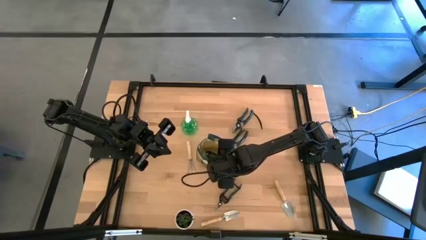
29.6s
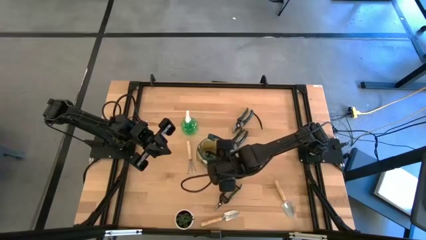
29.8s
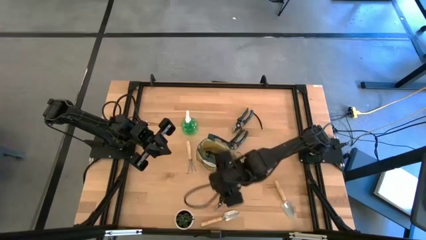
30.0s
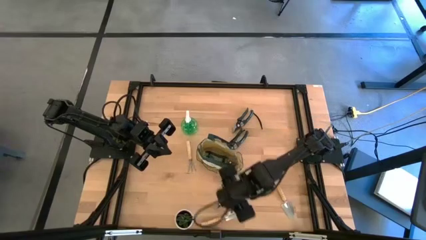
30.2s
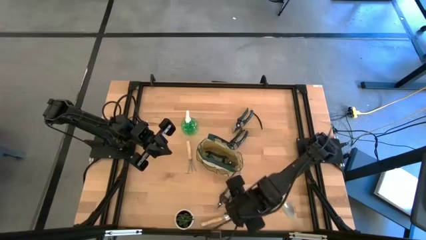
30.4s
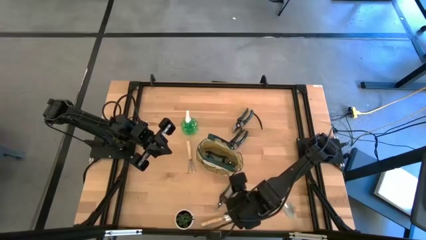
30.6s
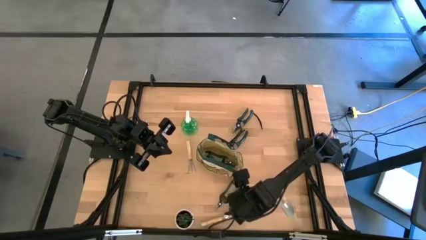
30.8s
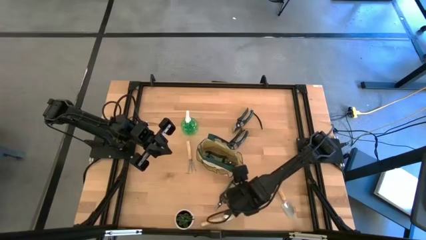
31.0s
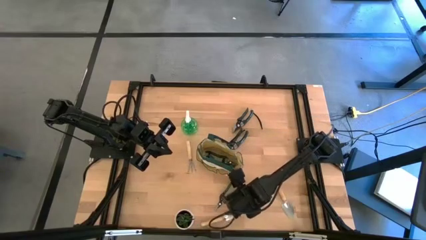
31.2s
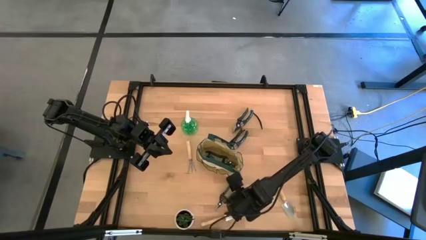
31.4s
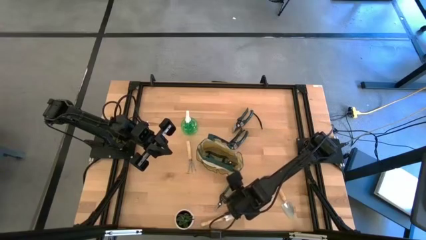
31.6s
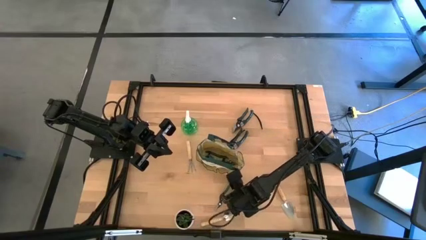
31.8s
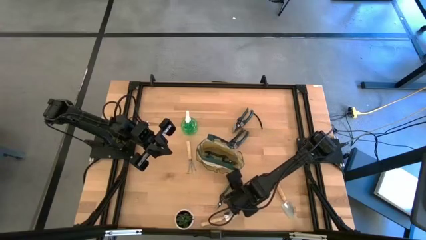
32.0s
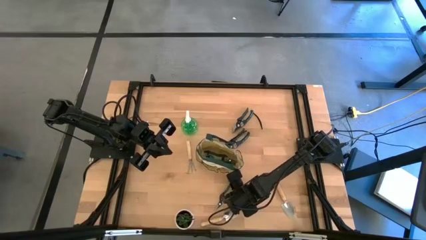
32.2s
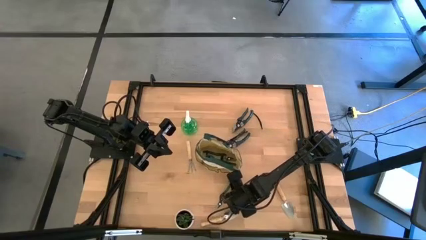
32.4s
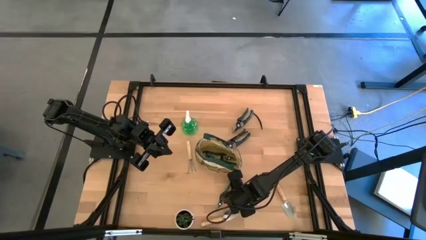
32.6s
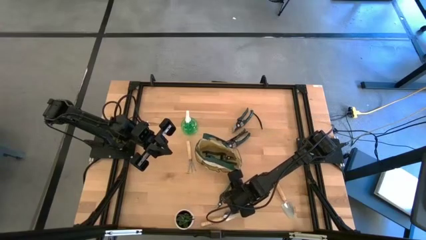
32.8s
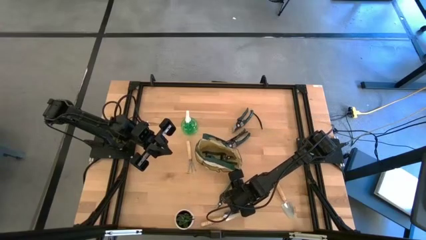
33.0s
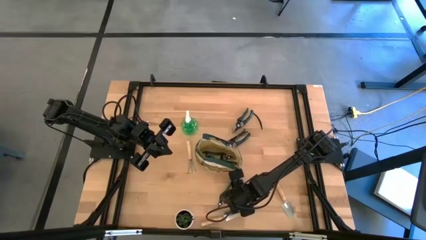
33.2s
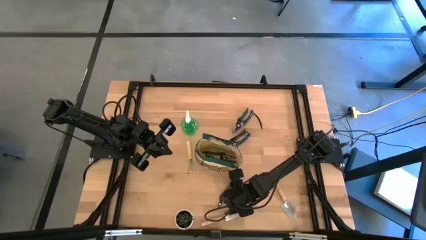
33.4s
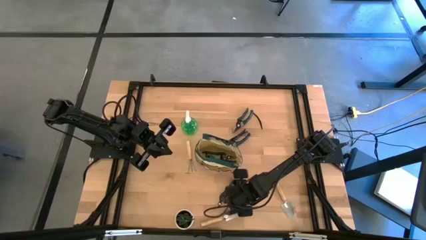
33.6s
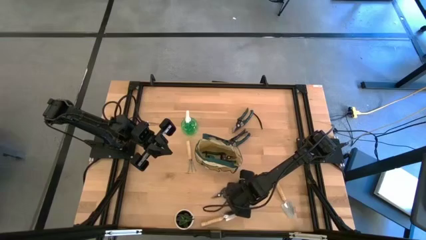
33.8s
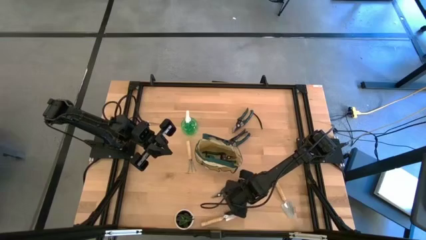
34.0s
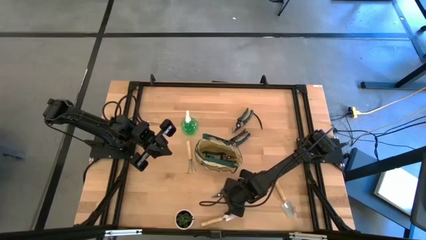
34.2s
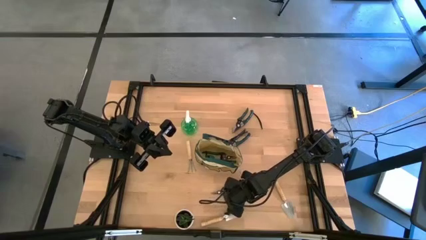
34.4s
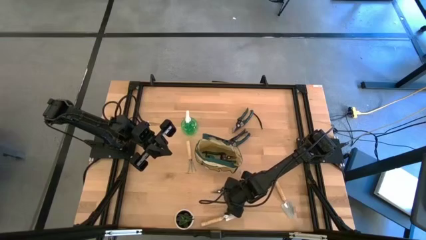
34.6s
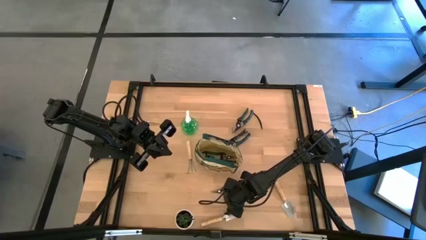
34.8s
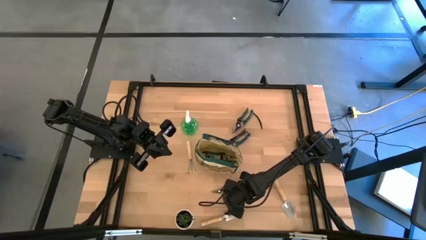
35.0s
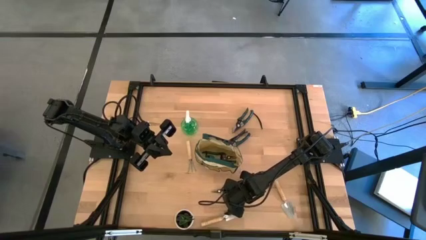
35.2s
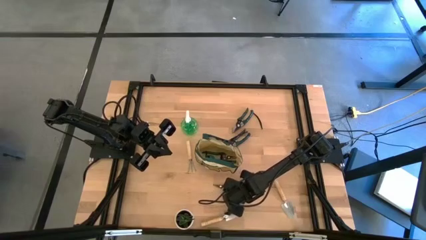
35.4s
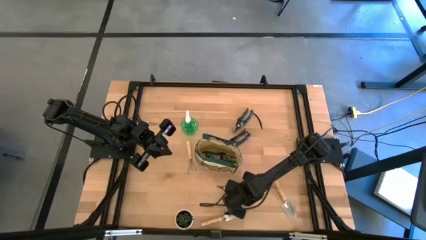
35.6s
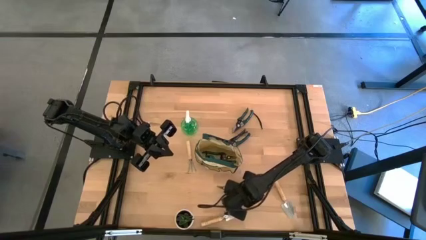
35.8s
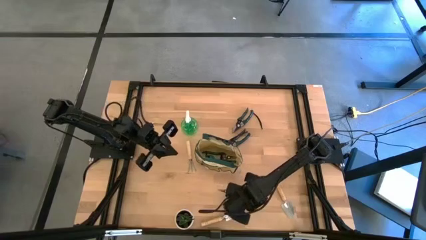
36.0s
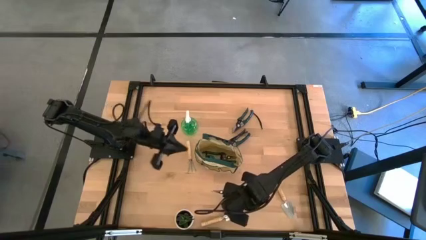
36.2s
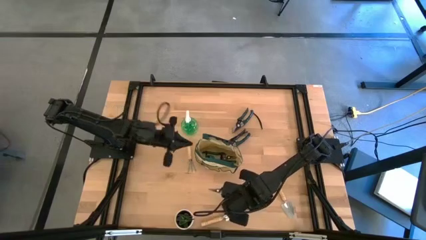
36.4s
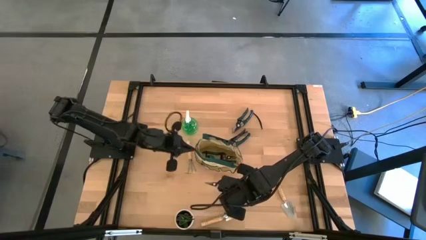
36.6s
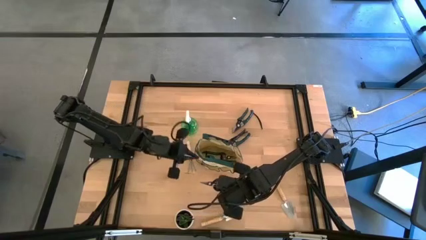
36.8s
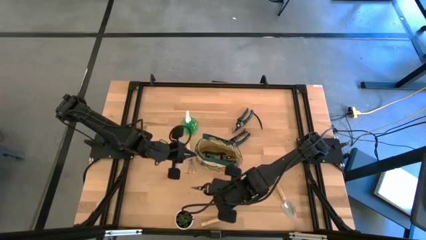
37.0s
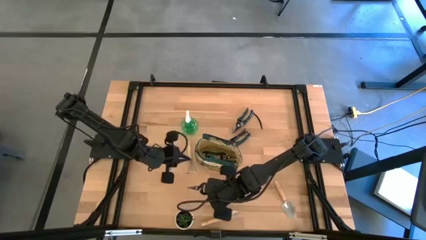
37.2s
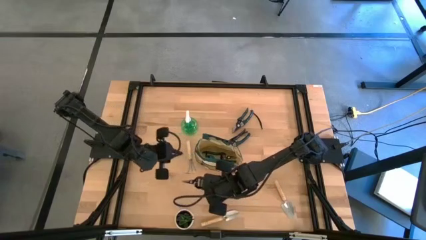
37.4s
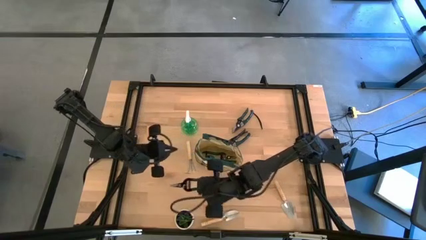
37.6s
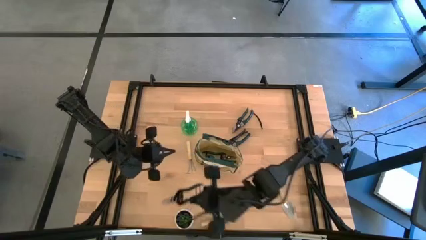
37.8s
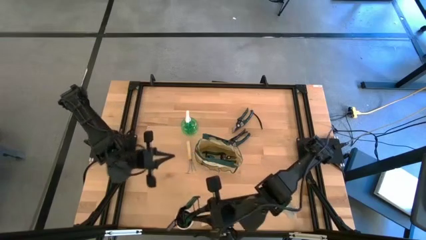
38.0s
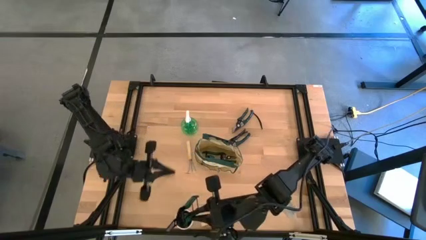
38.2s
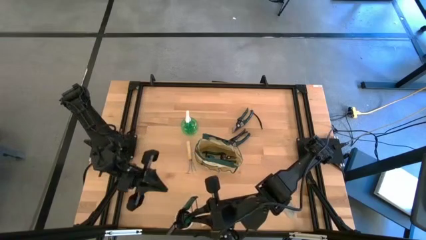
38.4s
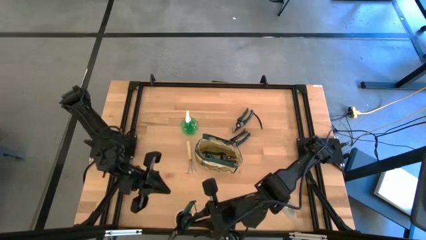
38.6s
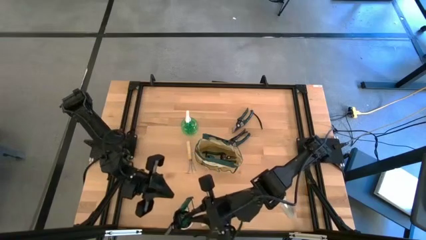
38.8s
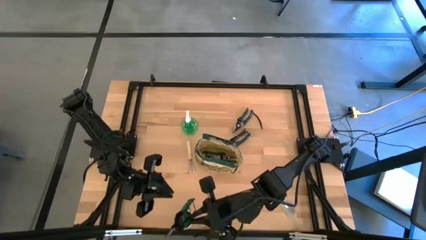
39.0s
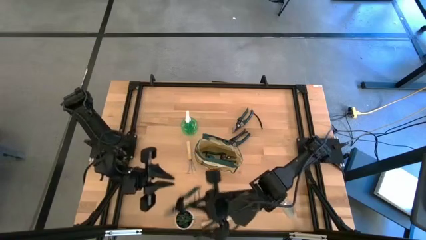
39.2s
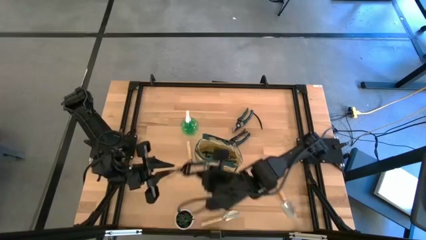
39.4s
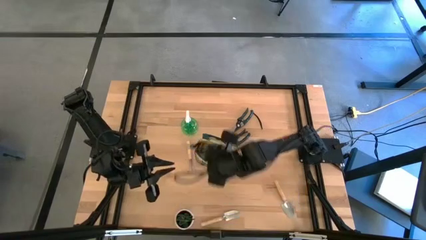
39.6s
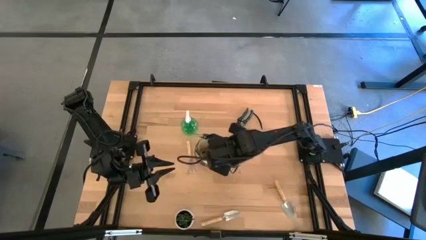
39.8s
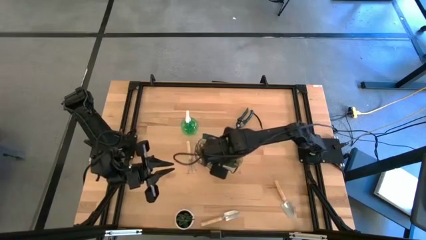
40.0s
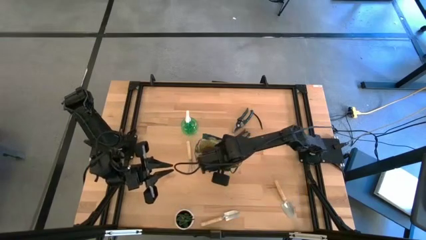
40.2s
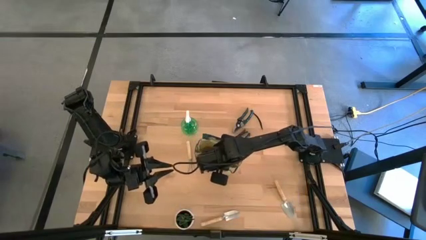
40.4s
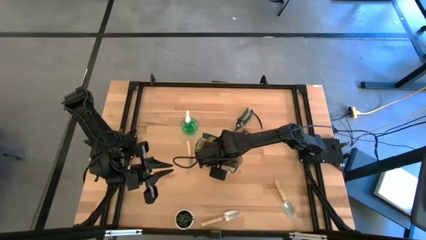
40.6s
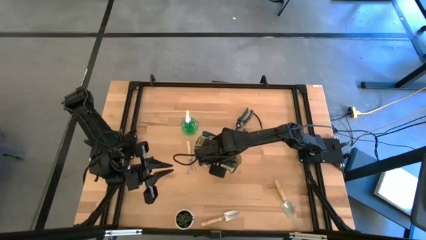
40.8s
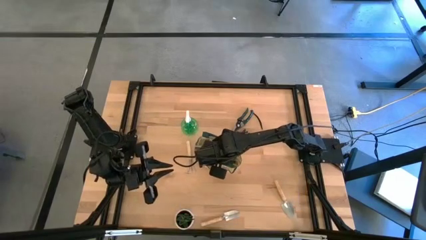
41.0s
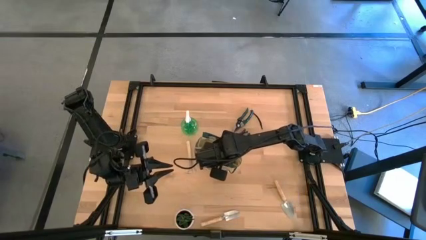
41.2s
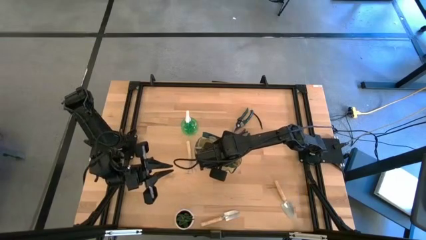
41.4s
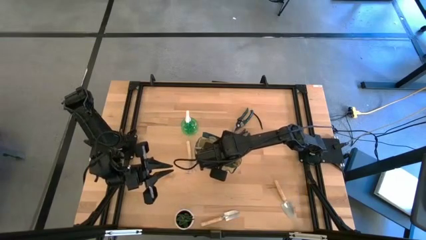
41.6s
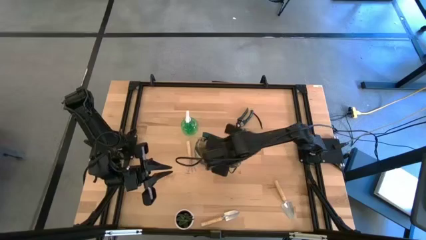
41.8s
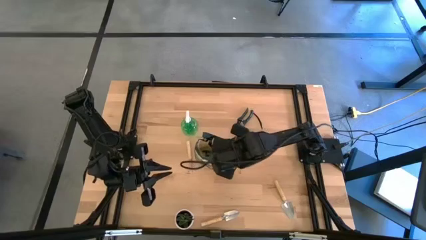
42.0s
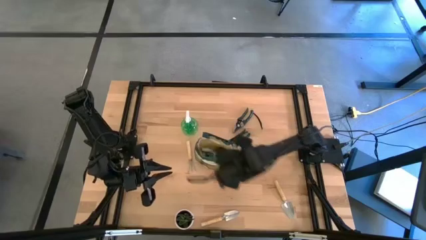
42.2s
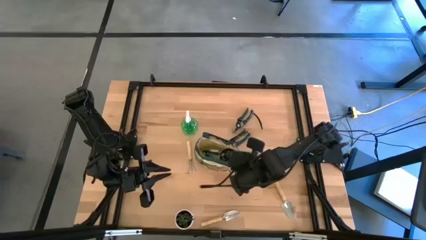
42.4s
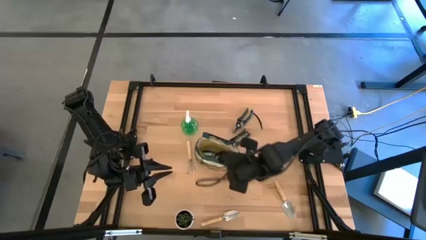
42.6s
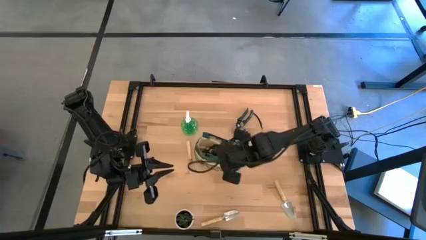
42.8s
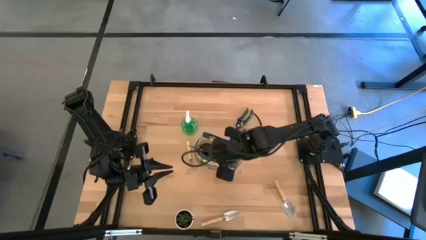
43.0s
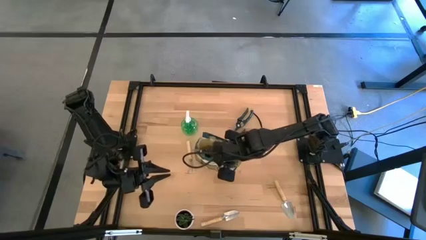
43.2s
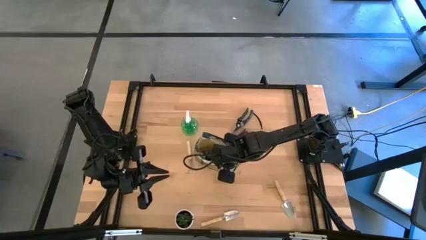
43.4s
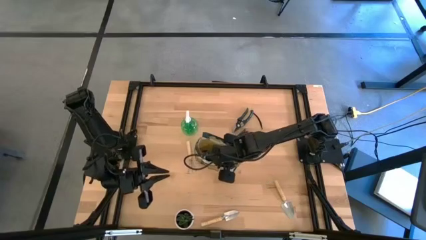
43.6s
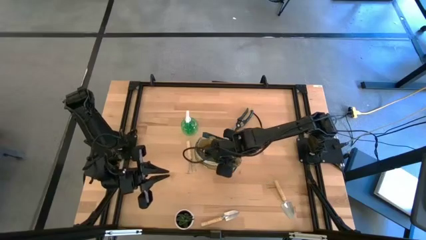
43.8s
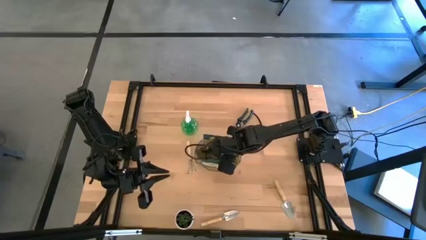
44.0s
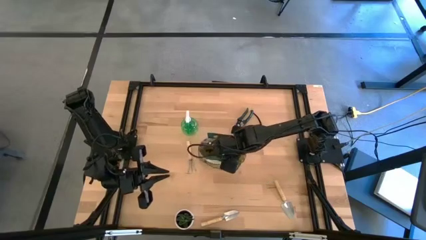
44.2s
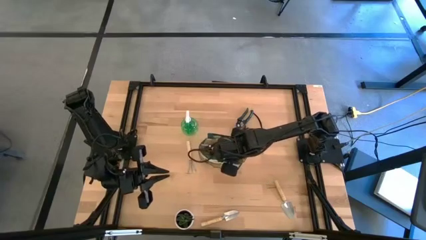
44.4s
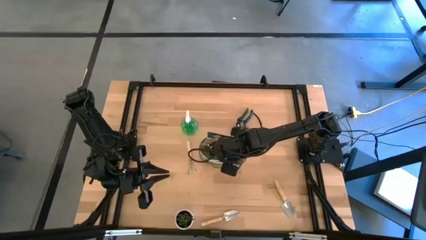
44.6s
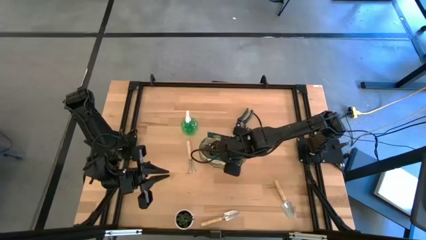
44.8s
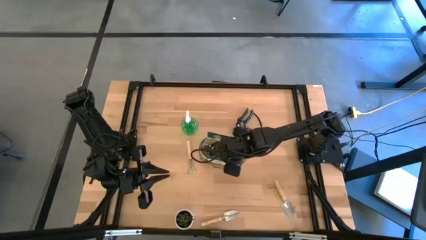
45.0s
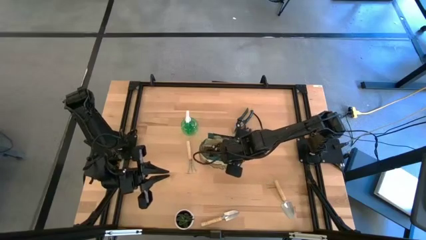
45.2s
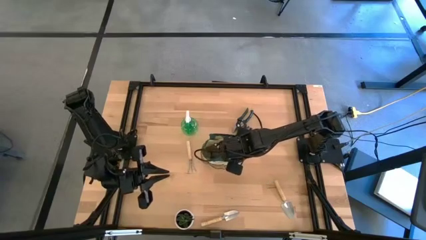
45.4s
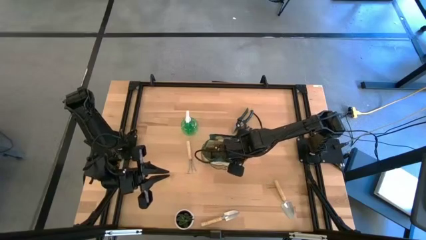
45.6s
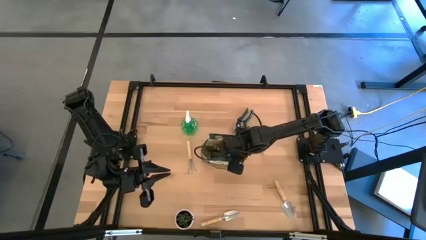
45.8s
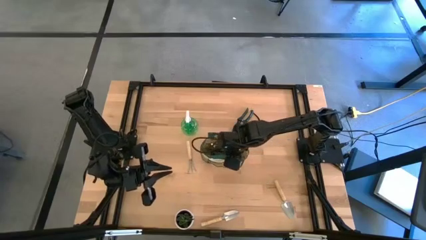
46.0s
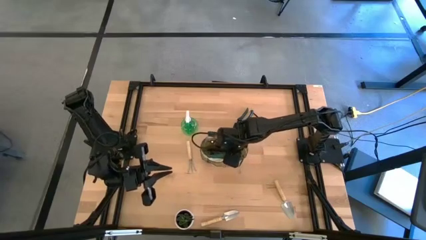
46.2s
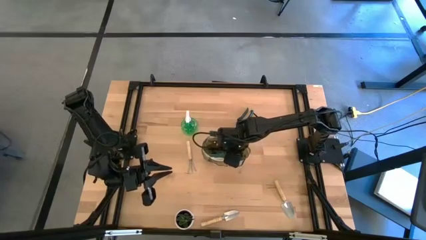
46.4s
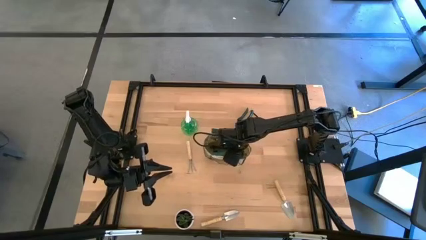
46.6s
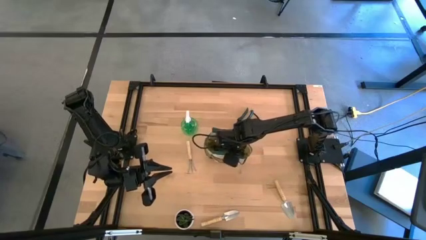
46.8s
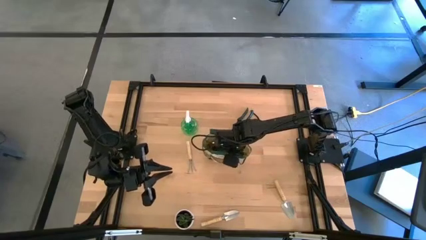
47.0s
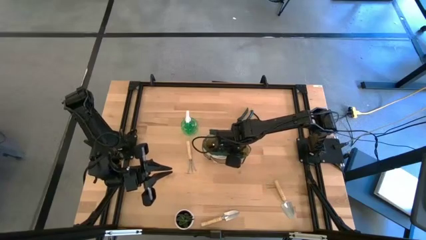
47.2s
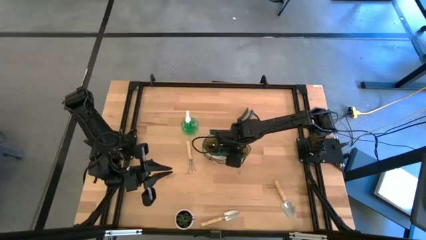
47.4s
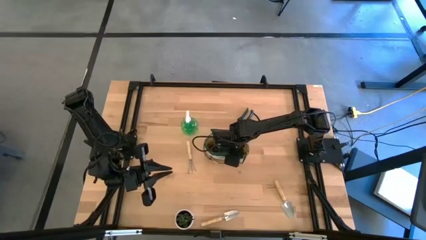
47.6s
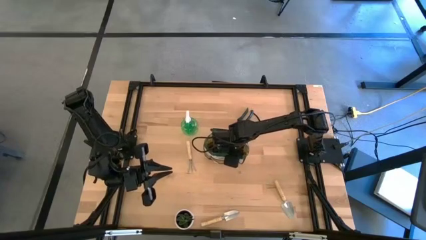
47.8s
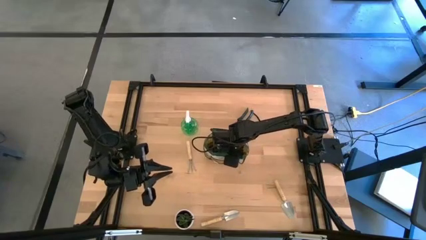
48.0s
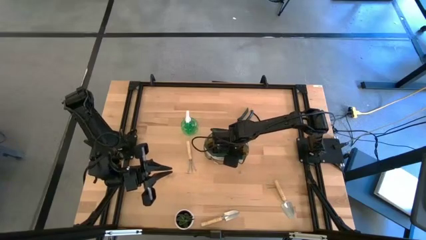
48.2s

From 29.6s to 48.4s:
Task: Pick & Place Garden tools in Gardening bag
Put the green pruning shears into the green gardening bag
